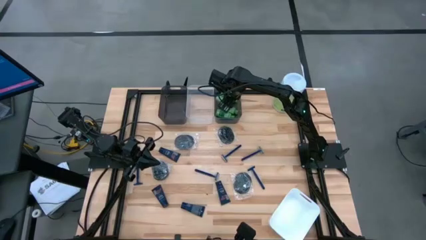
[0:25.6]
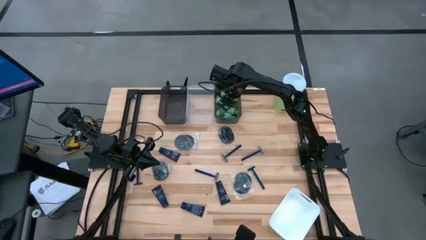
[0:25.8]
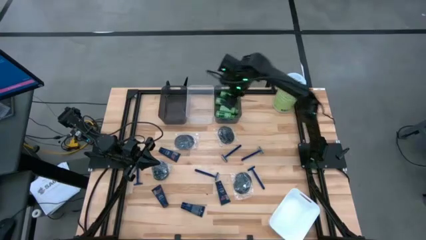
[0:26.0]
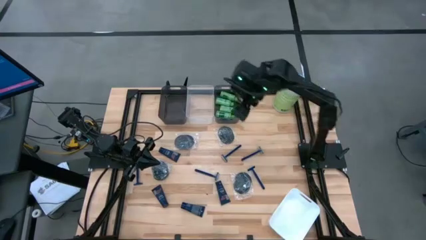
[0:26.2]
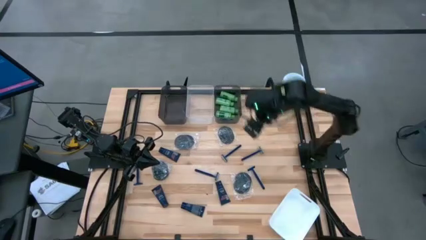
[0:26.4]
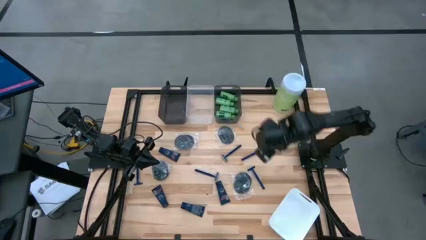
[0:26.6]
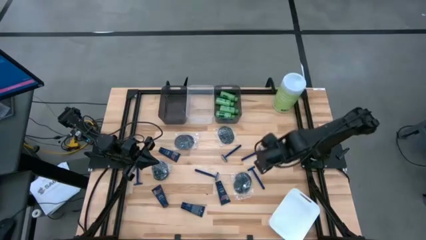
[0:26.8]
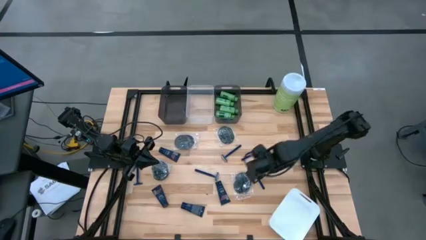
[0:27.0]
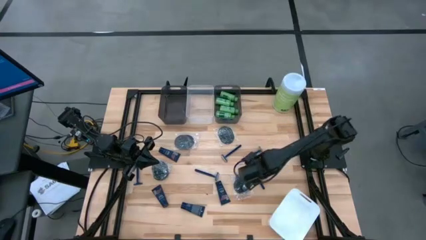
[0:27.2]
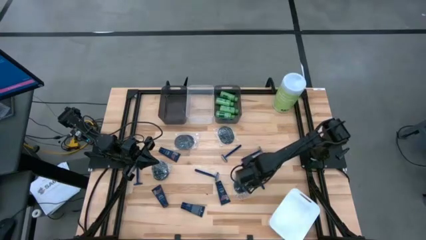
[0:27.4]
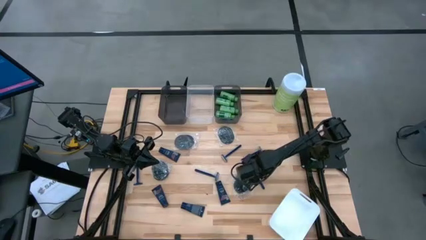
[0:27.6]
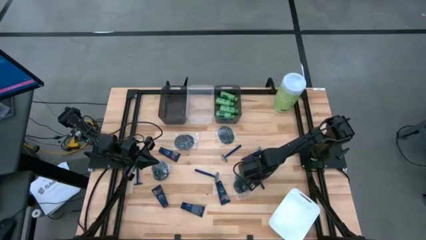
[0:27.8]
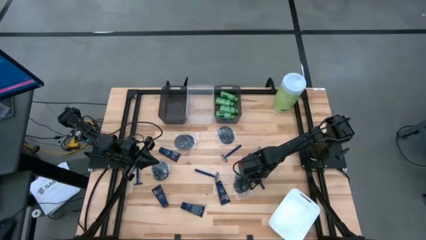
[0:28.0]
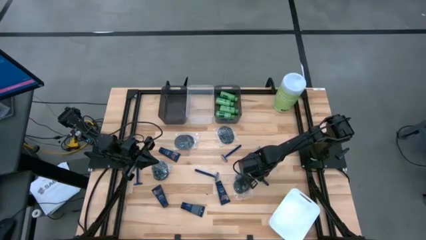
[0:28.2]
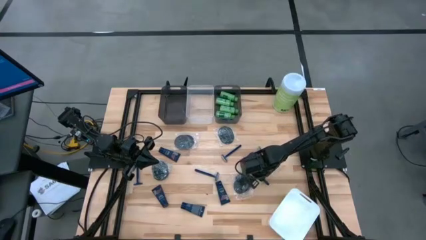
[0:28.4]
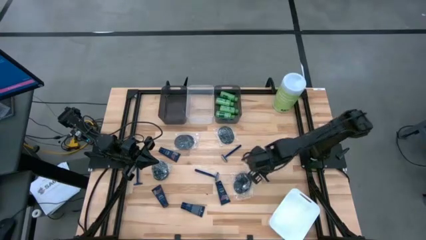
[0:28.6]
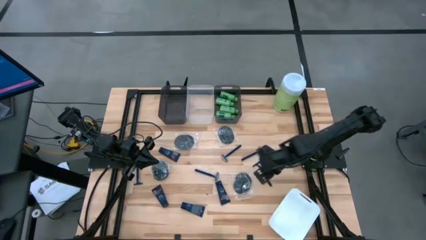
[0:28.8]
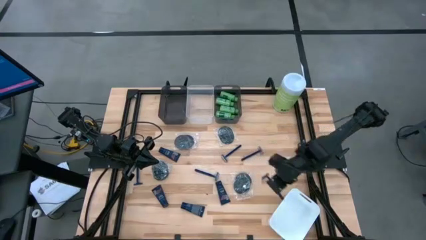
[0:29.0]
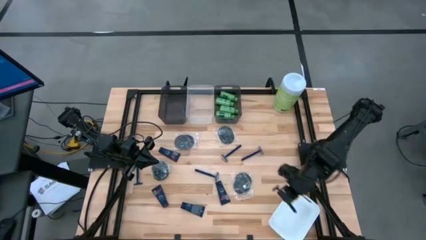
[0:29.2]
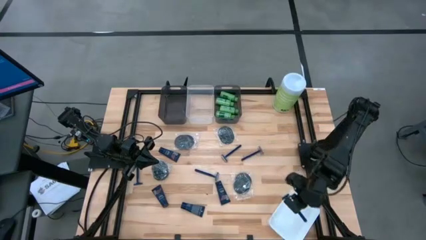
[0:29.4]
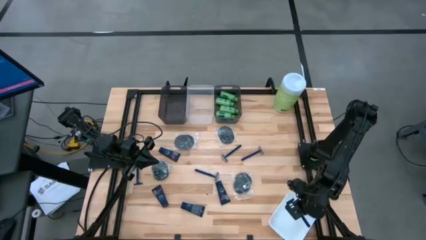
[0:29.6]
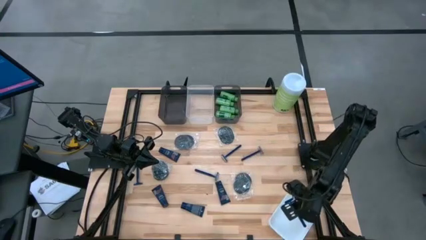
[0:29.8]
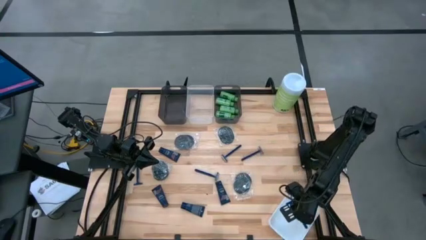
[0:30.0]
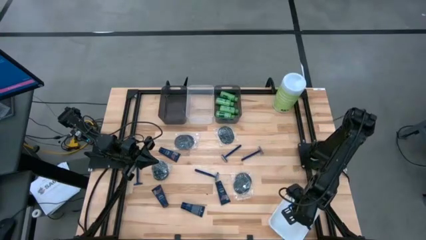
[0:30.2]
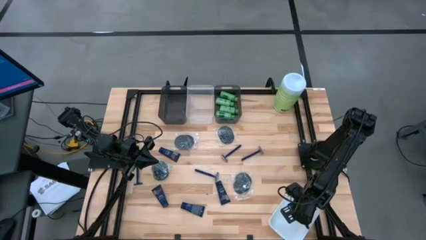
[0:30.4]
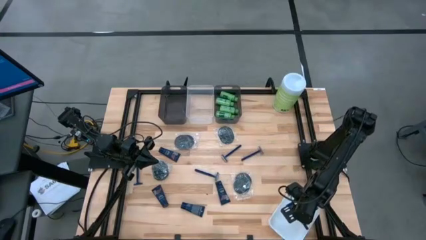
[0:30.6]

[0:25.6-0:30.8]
Task: Pick & Place Travel size toiletries
Put the blue razor into the white bin

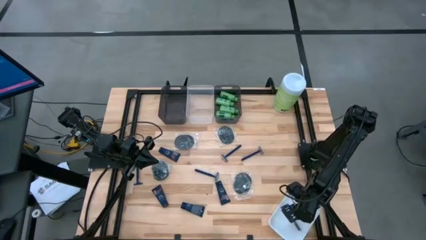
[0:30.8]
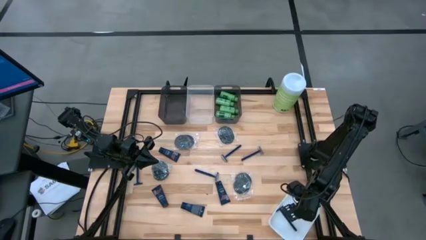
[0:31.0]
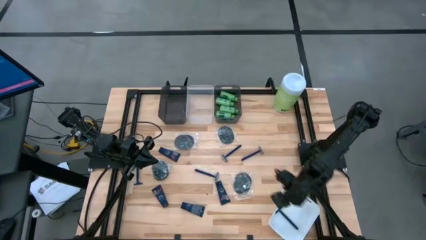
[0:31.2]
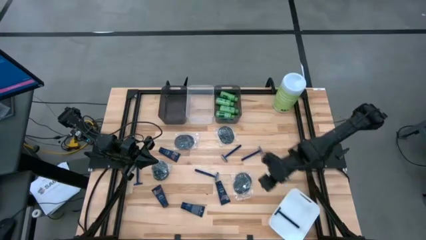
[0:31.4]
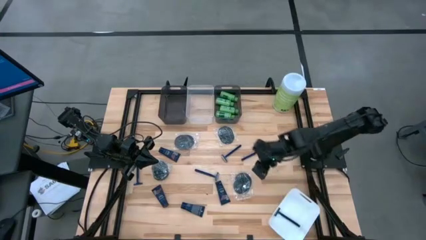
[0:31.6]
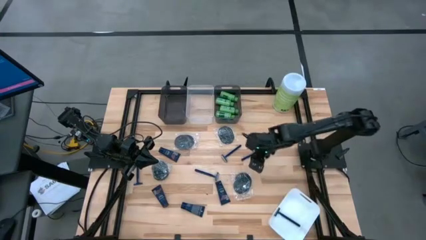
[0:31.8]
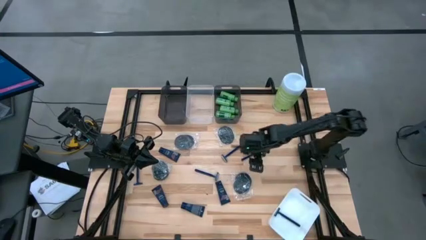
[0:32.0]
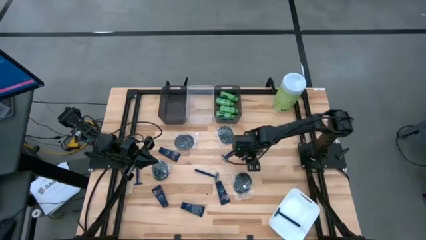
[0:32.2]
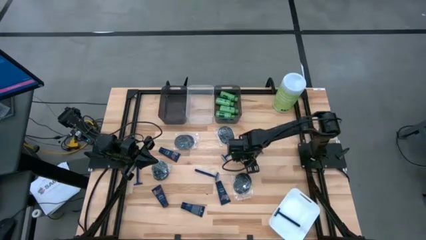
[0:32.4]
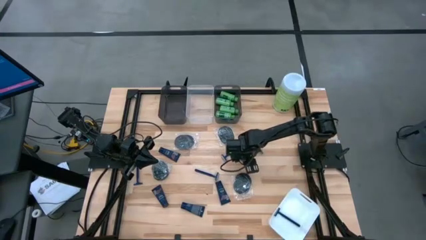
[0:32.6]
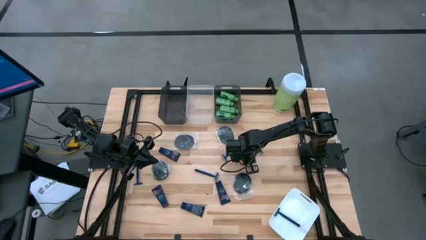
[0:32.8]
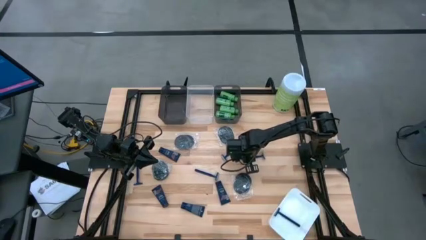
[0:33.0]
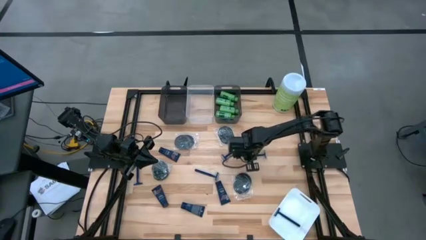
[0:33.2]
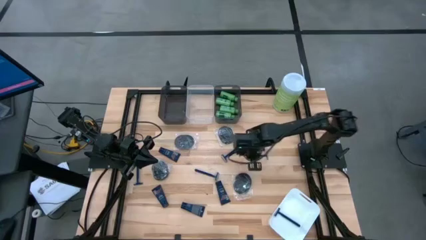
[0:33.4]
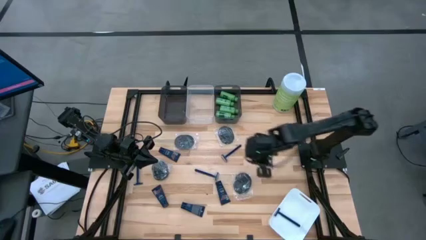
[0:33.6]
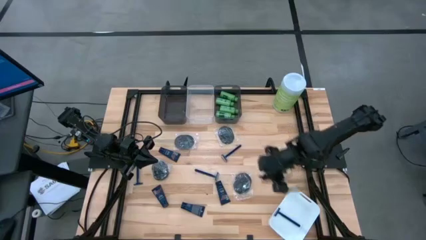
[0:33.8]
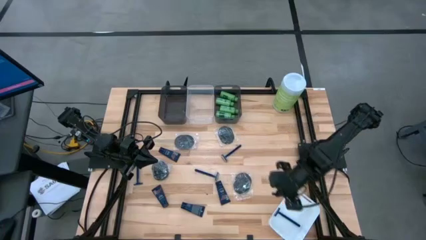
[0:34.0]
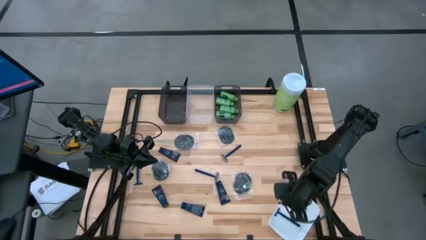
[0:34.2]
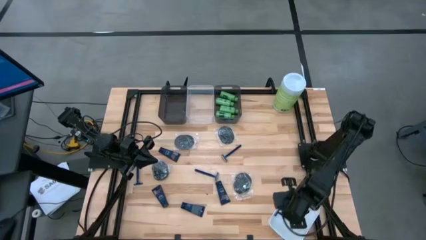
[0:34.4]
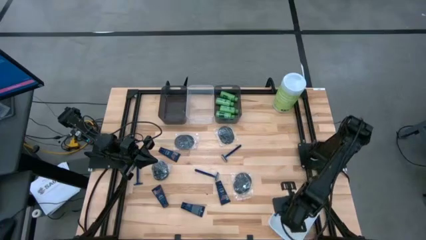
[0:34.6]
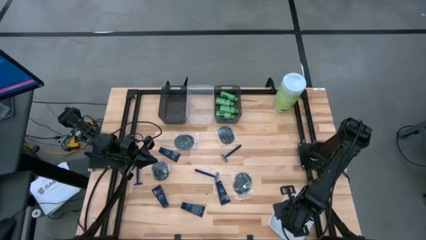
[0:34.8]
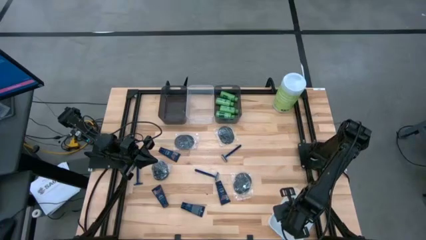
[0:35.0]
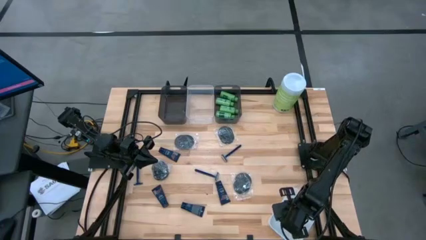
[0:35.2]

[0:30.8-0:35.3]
Put the blue razor into the white bin

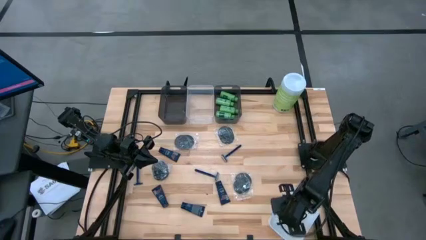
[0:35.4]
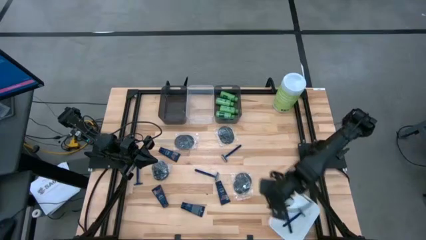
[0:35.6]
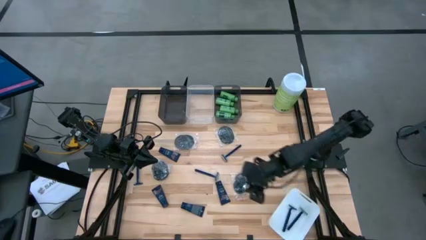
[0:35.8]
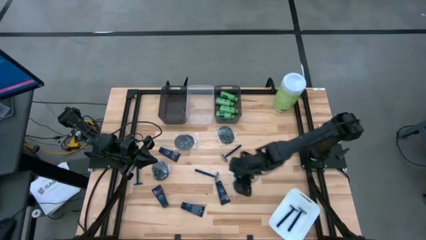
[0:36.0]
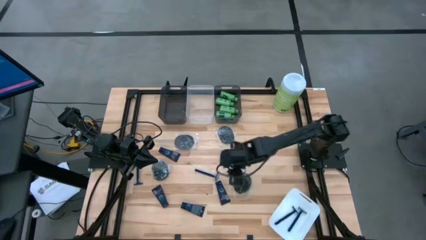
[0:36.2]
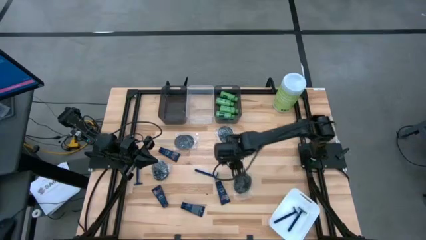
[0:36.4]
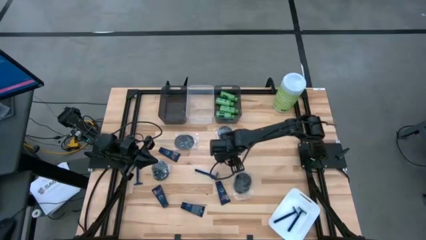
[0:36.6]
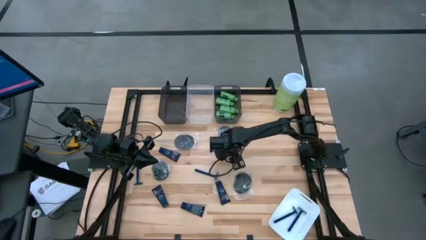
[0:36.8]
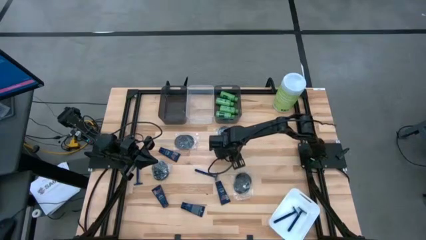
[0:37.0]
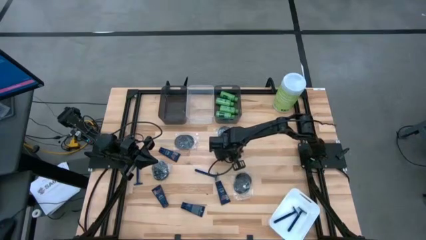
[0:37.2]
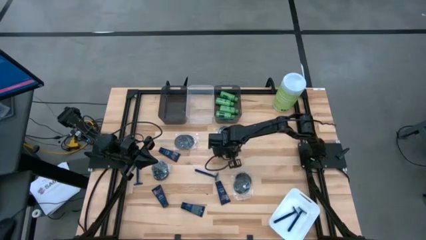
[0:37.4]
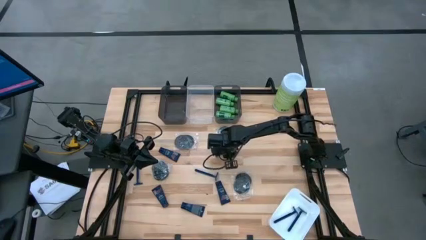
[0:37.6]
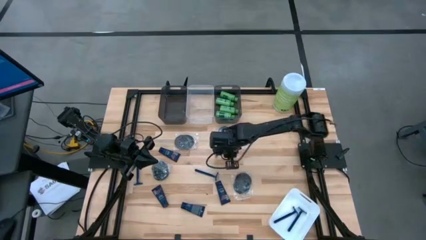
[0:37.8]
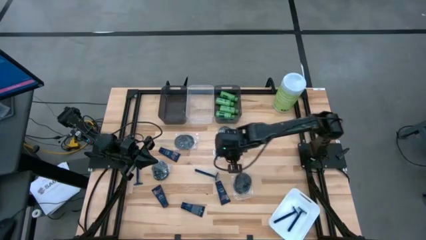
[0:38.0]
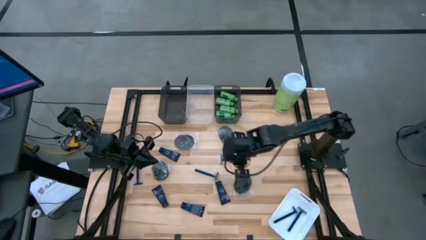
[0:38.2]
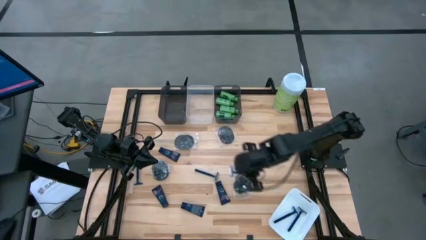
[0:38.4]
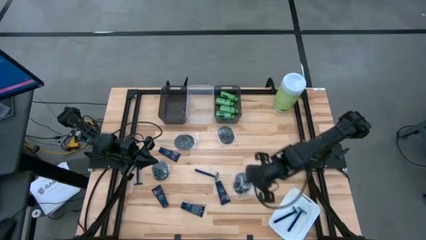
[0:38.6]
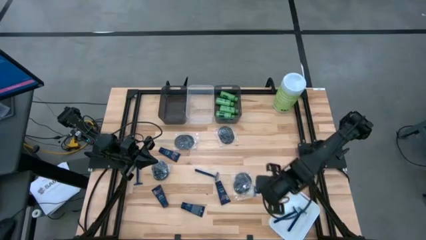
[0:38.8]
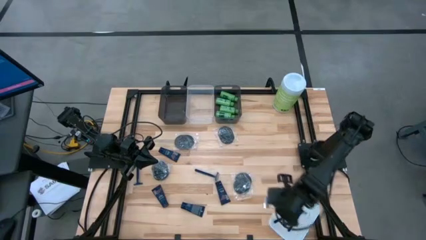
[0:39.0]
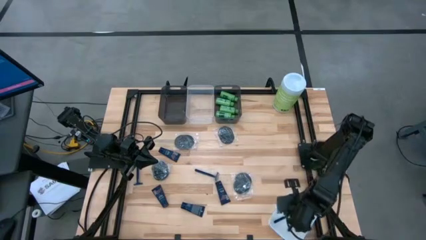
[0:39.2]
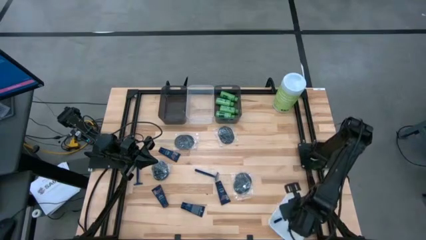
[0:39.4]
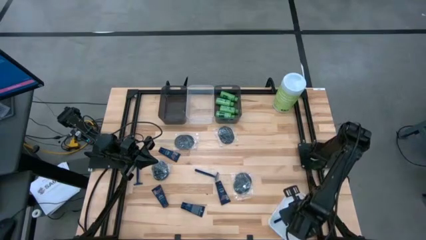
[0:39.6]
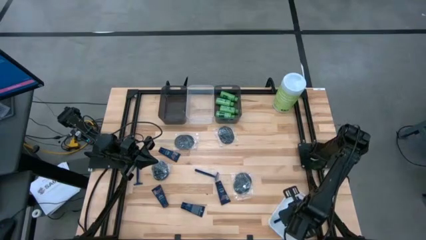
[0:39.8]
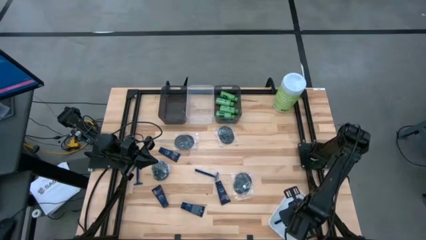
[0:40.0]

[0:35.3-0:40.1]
Put the blue razor into the white bin

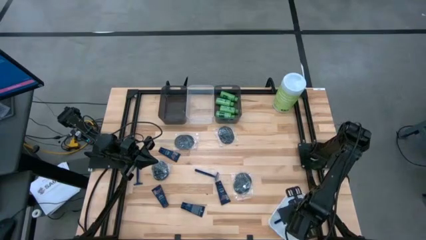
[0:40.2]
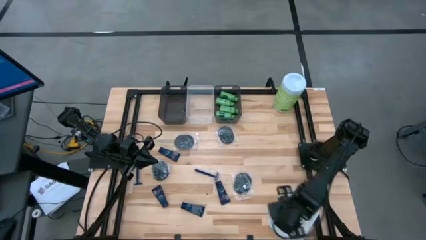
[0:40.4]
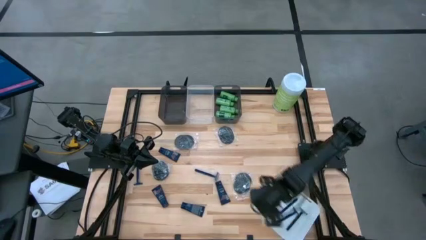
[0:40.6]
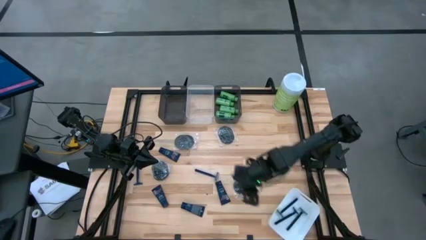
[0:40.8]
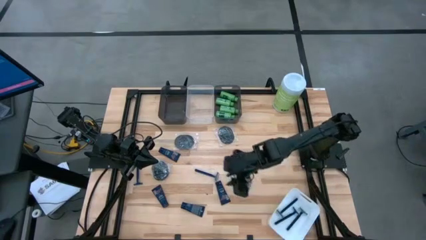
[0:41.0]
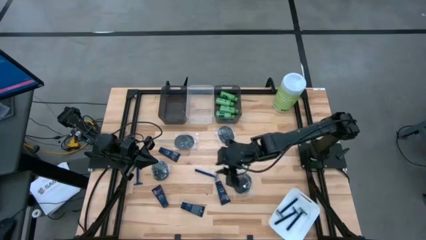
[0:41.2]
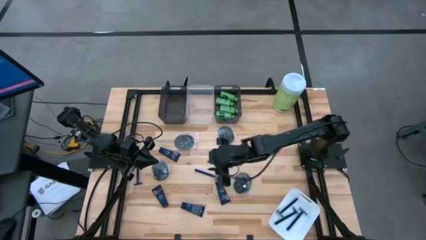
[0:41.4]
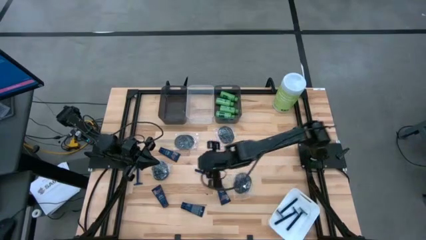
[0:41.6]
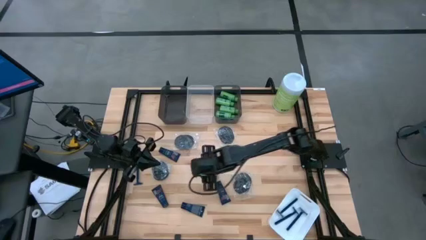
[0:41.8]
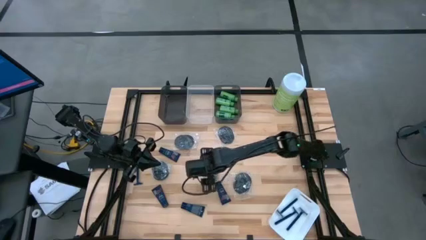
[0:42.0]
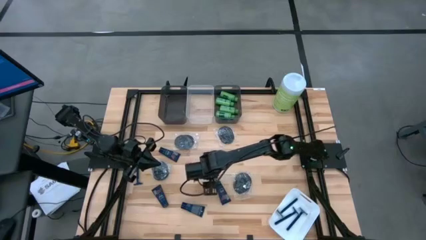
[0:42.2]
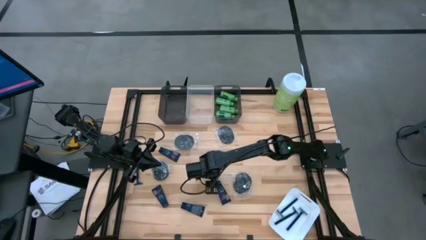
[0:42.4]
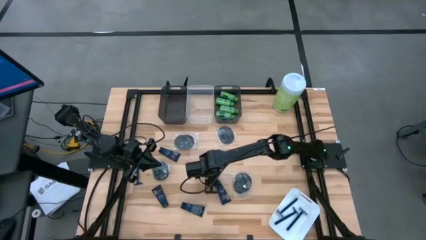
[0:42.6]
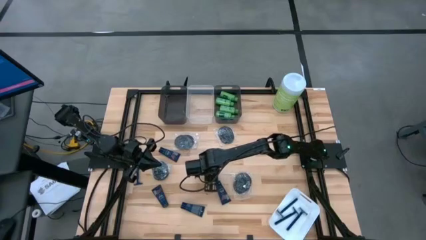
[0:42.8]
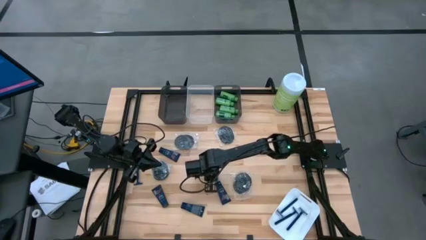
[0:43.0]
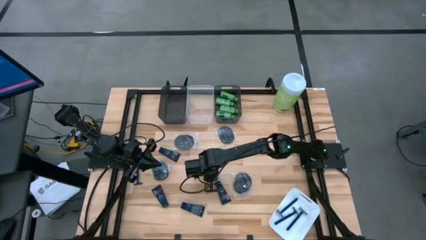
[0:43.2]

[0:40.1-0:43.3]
Put the blue razor into the white bin
